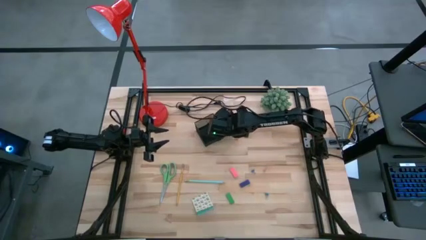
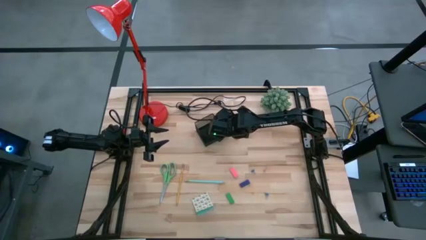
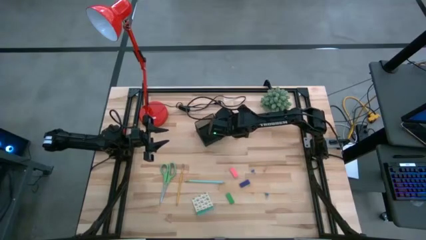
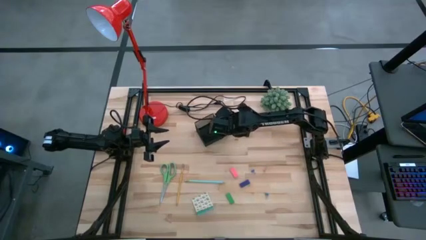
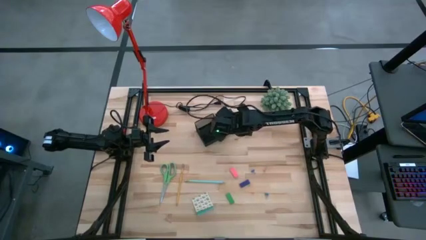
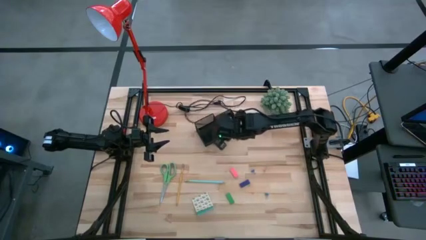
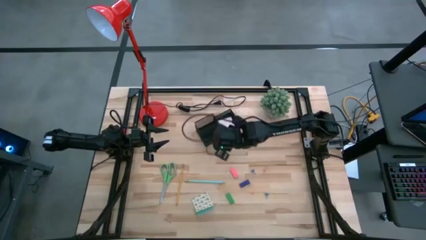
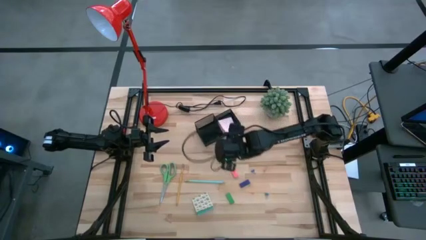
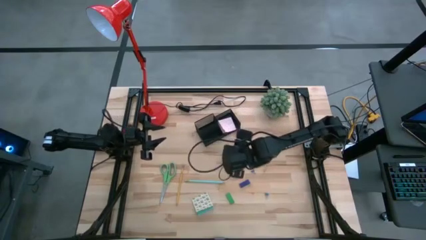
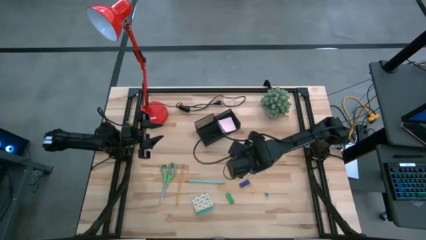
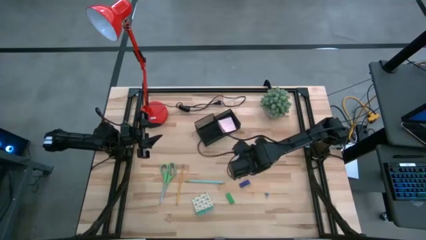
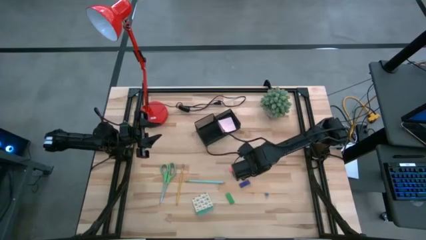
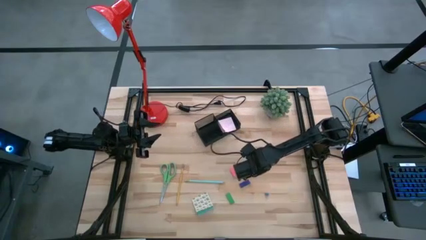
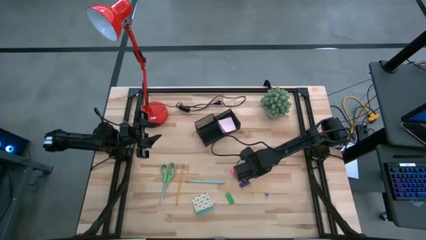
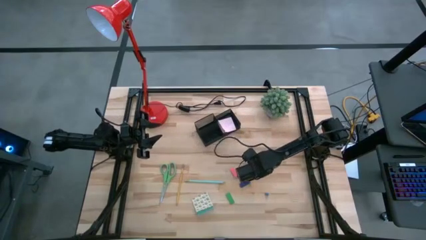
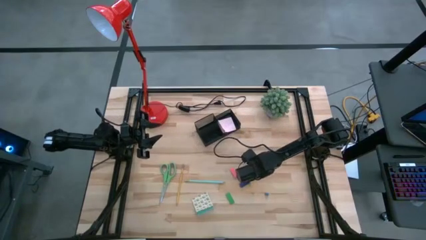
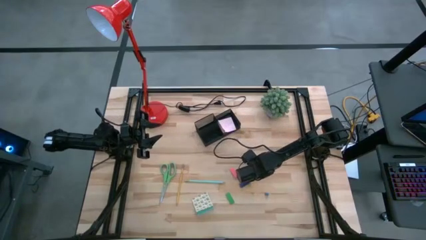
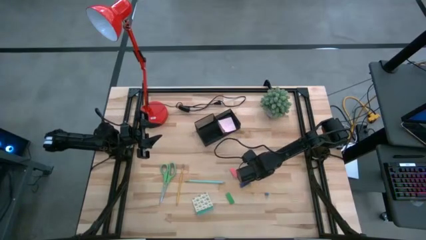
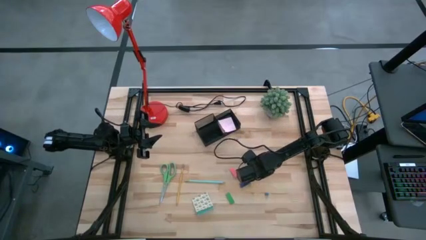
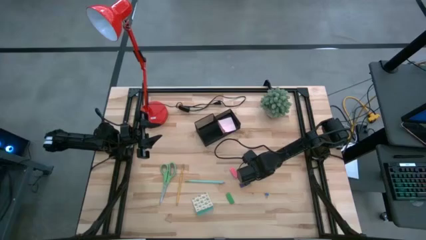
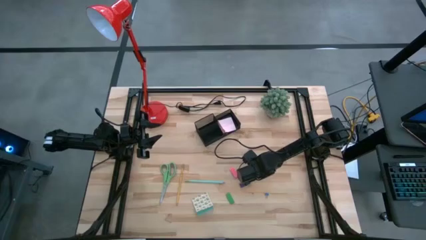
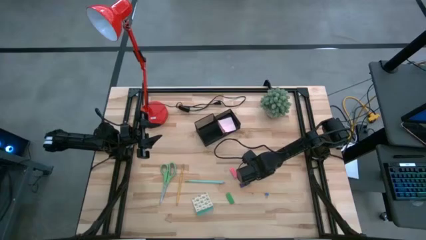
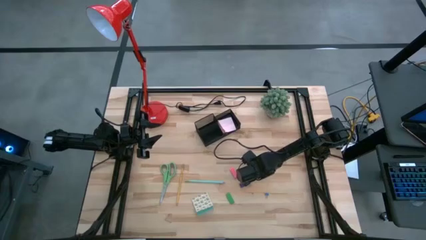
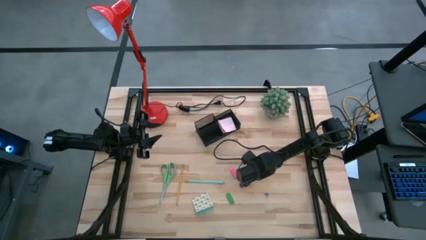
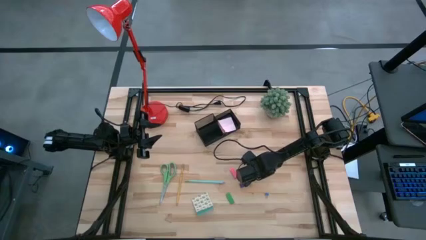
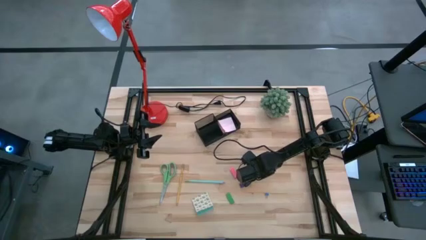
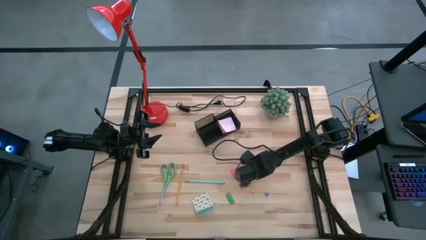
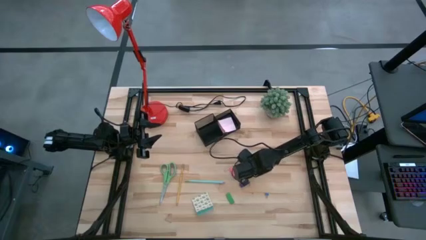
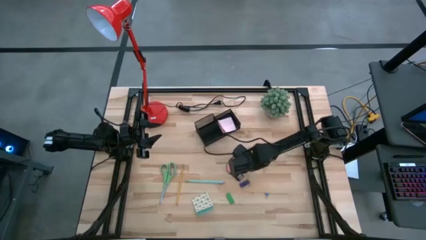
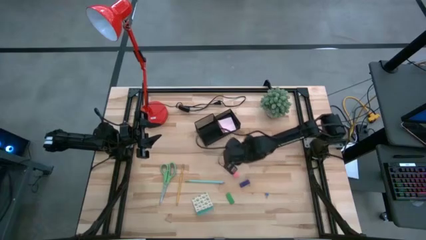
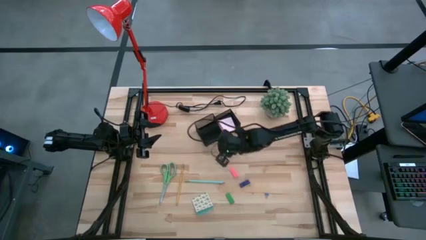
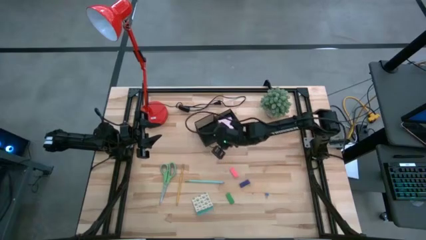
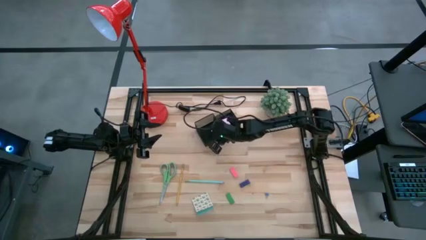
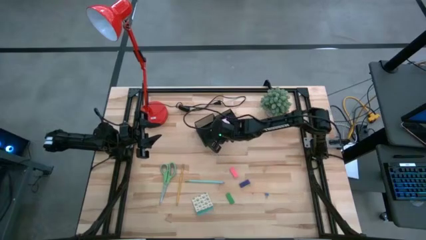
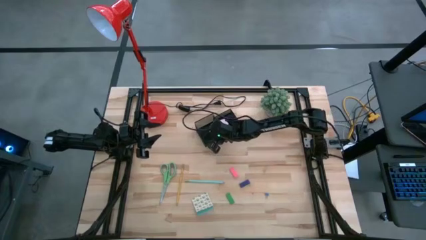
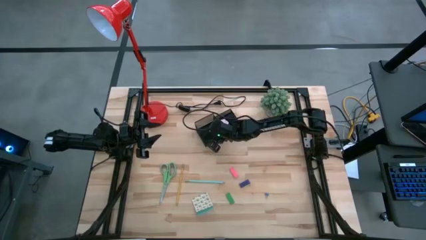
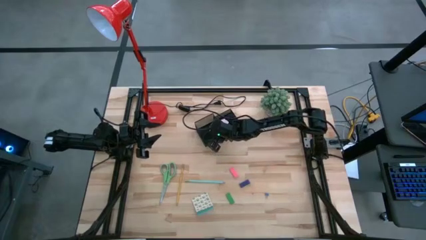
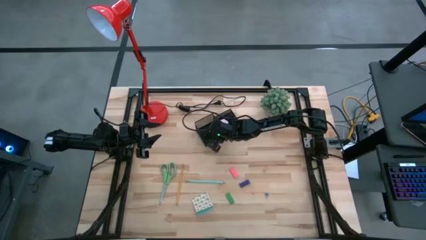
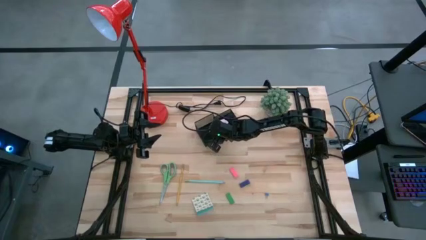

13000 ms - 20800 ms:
Task: Pick and place office supplies into organizer
Put the top blue binder clip into the desk organizer

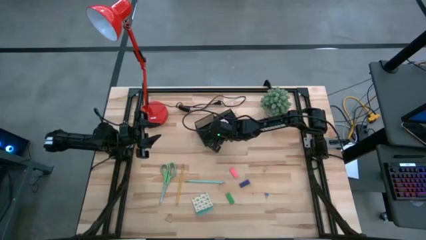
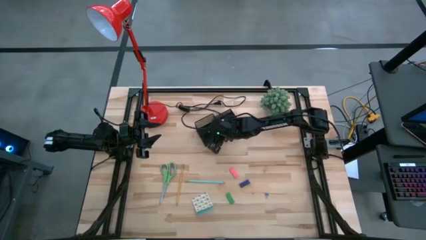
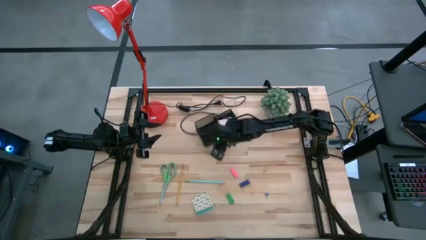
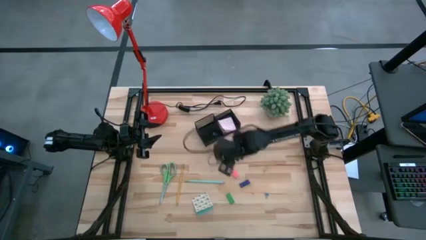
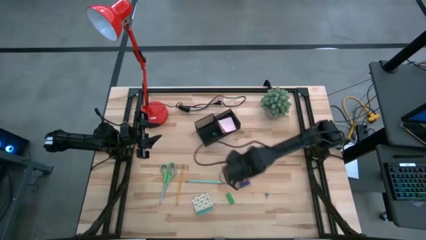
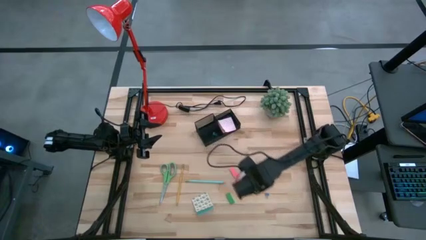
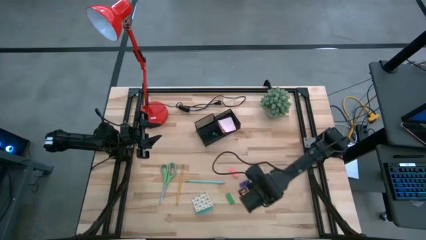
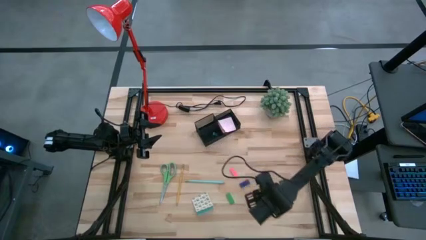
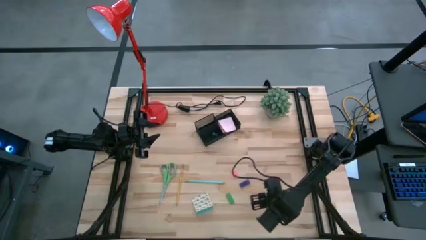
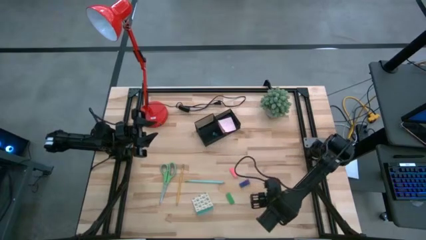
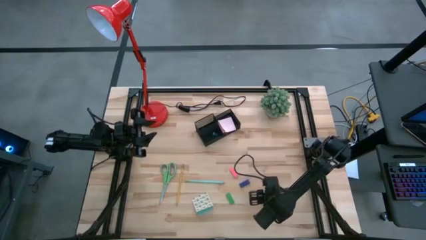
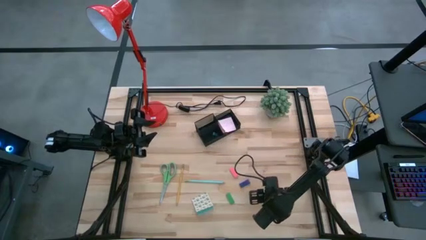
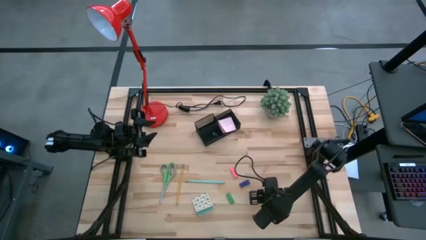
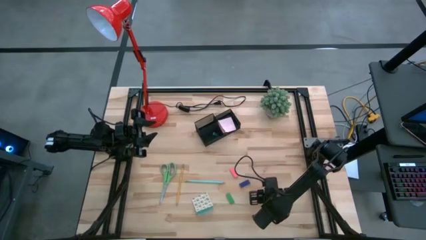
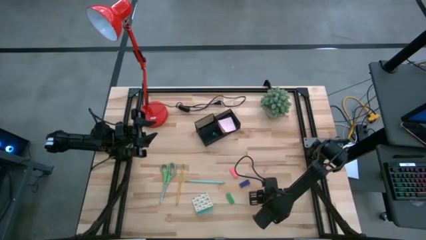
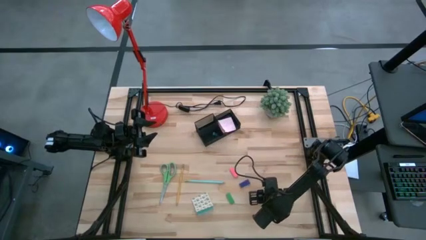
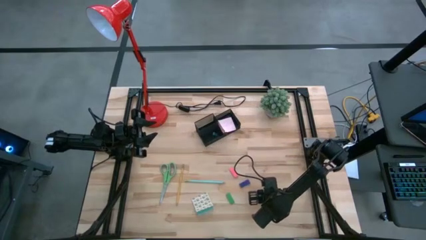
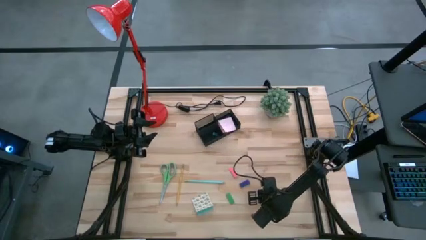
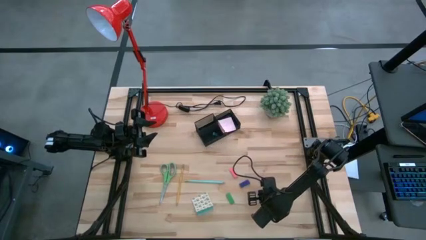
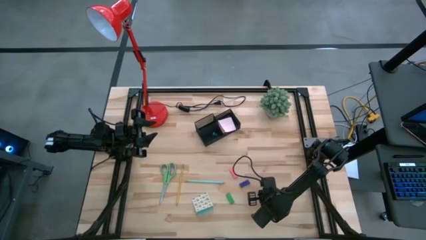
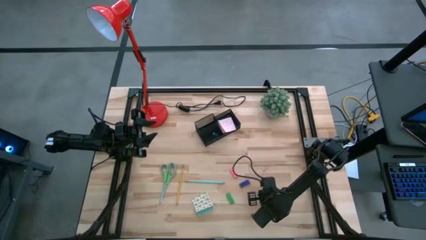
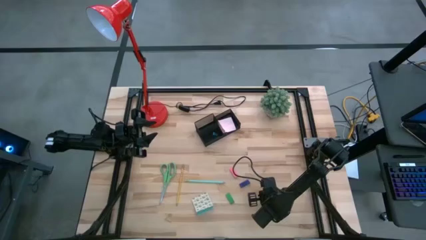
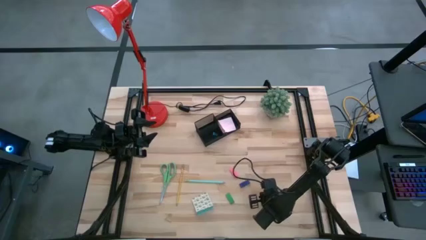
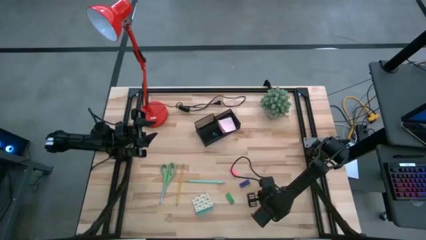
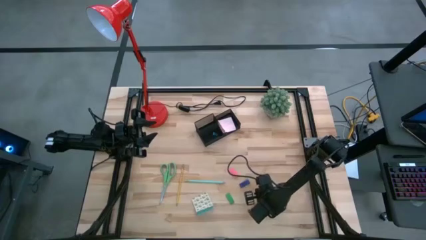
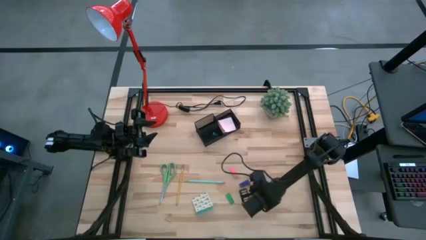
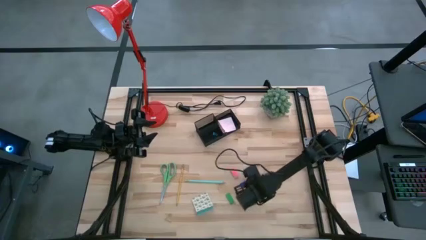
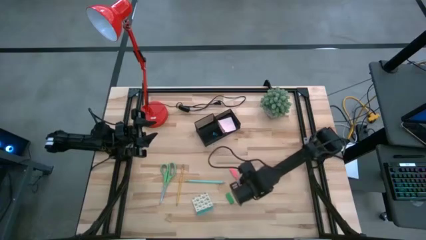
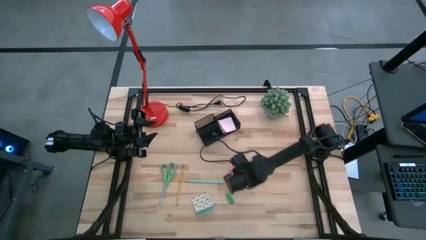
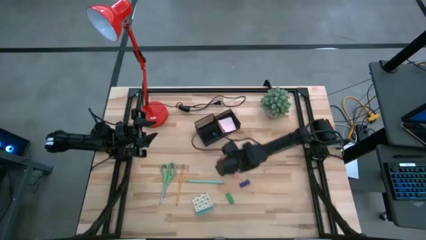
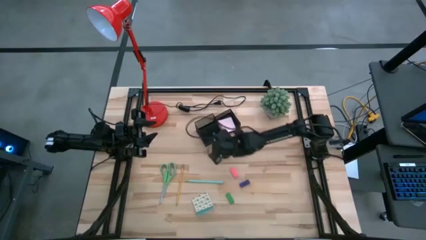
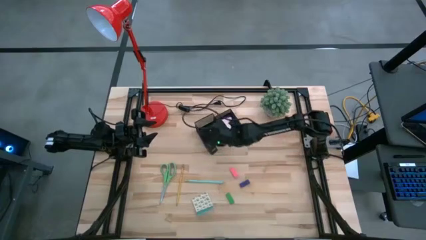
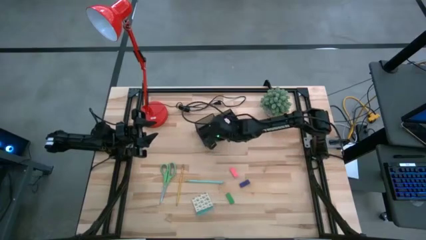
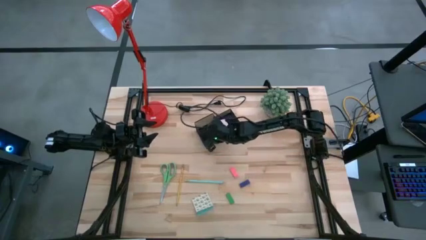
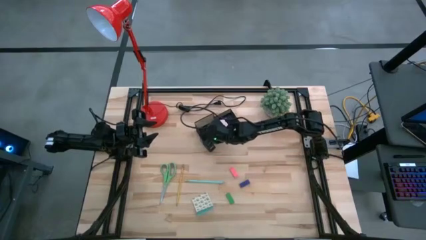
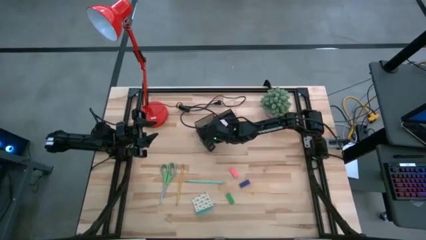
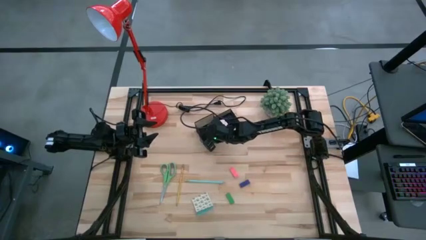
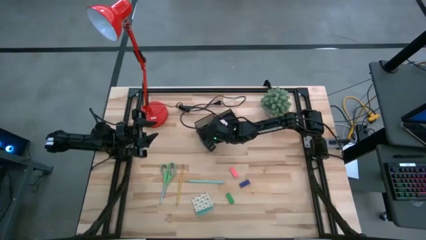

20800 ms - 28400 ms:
Put the blue binder clip into the desk organizer
